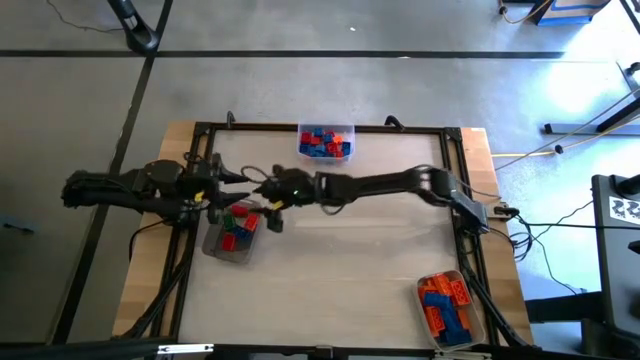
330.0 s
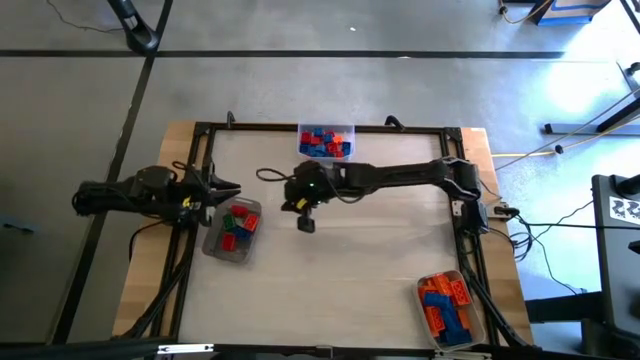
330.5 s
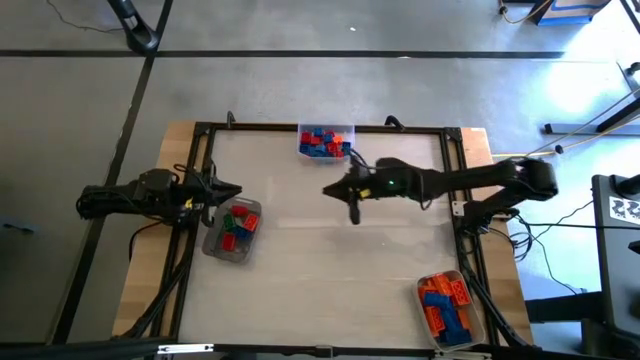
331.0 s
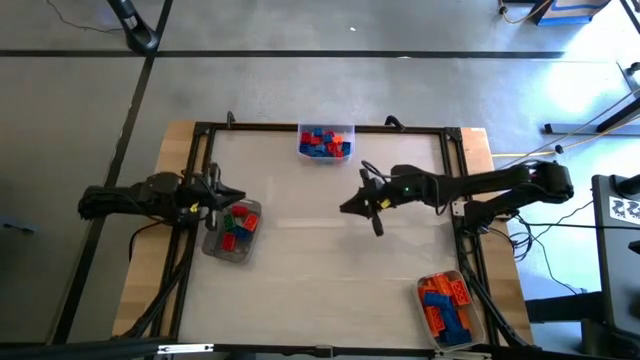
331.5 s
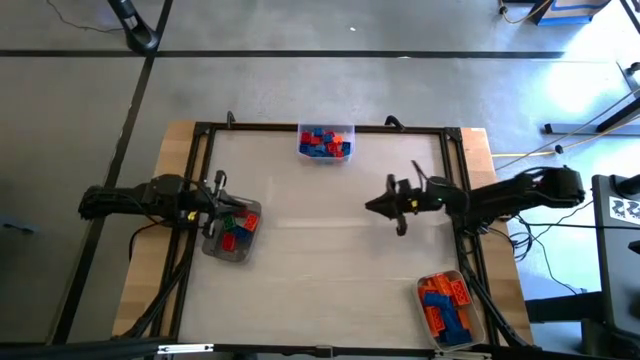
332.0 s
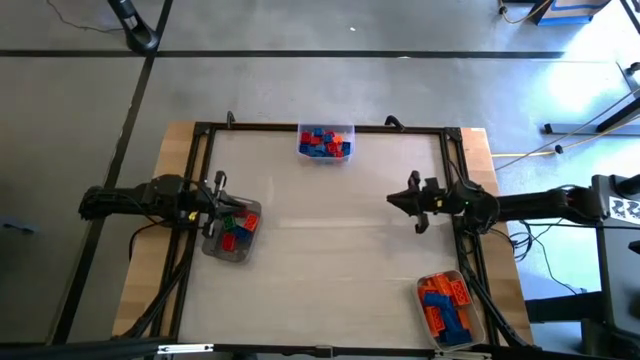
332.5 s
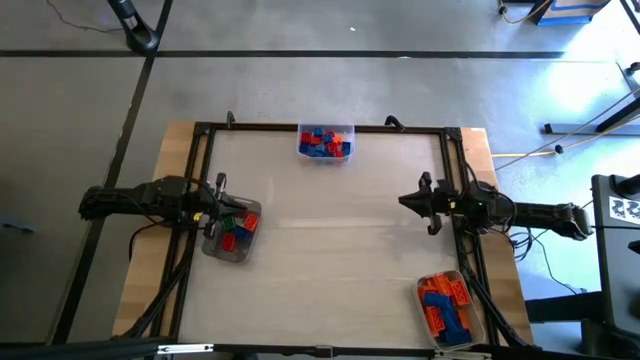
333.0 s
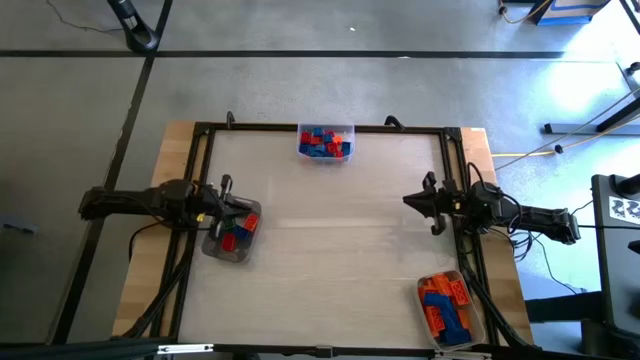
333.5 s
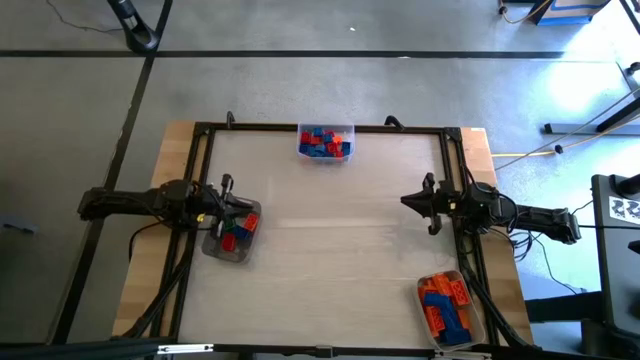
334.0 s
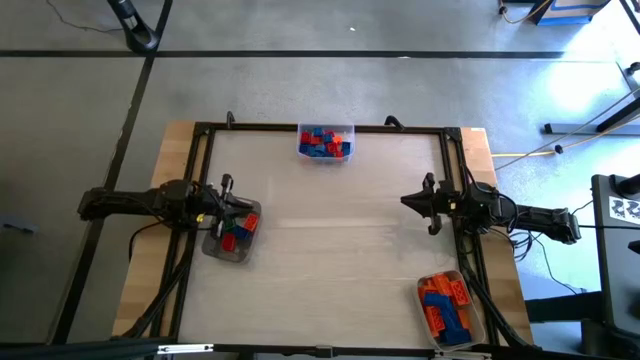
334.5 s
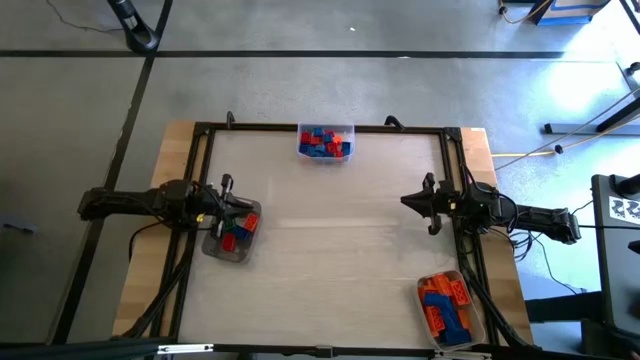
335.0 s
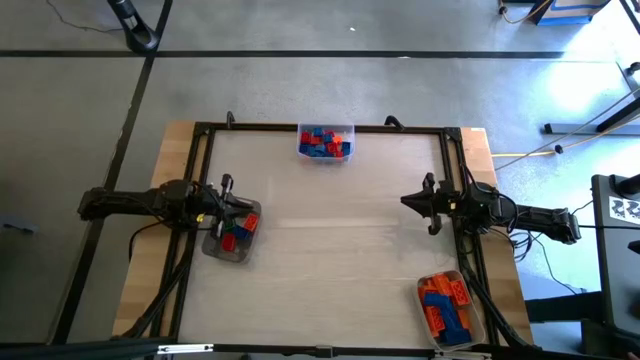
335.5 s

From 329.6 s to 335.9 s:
Task: Sort blocks by size
Return to Home Position

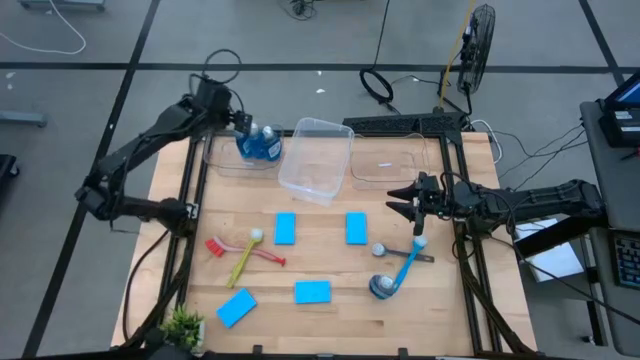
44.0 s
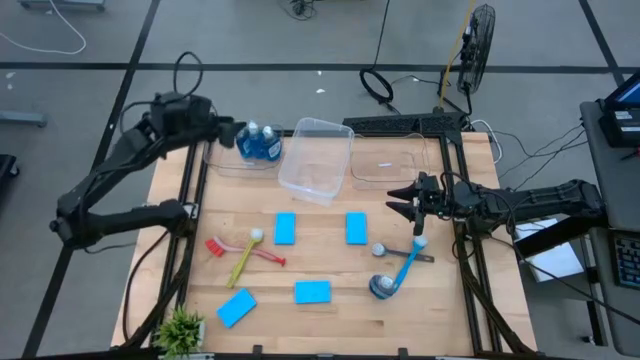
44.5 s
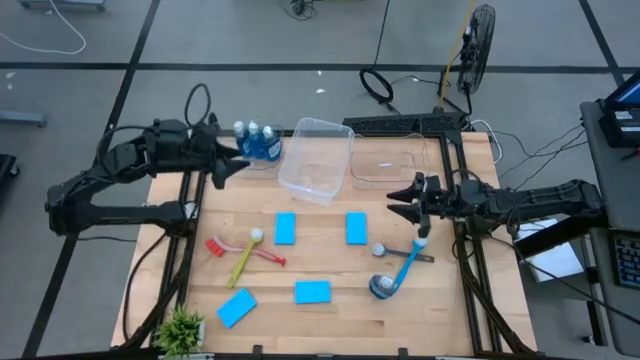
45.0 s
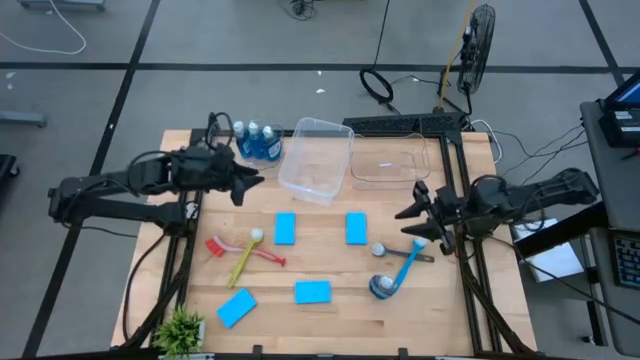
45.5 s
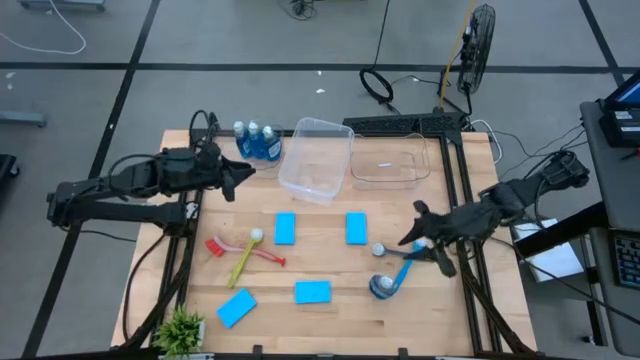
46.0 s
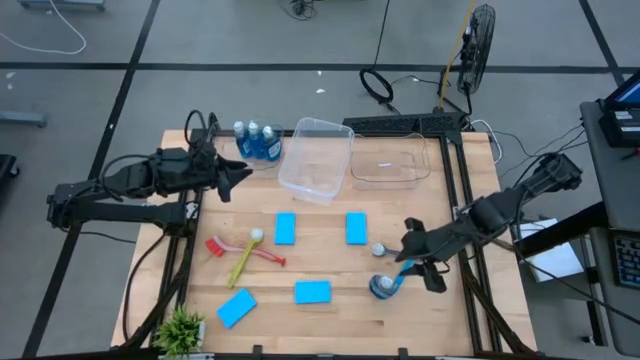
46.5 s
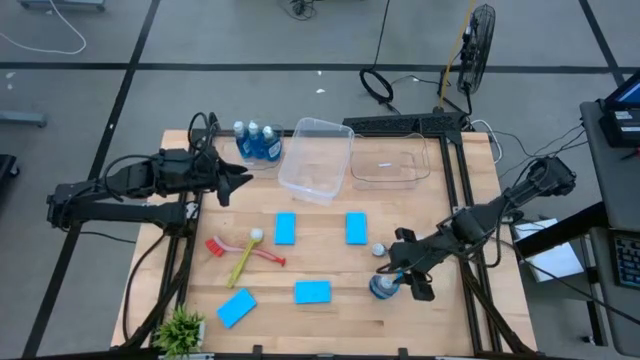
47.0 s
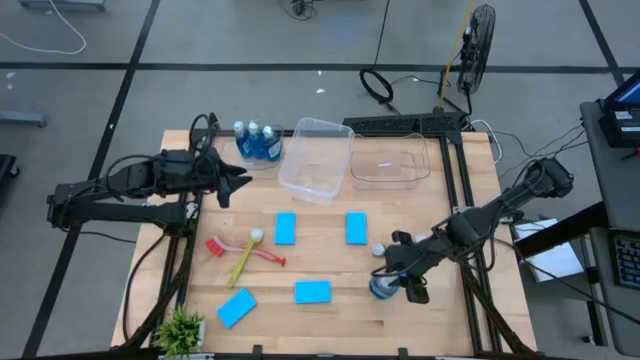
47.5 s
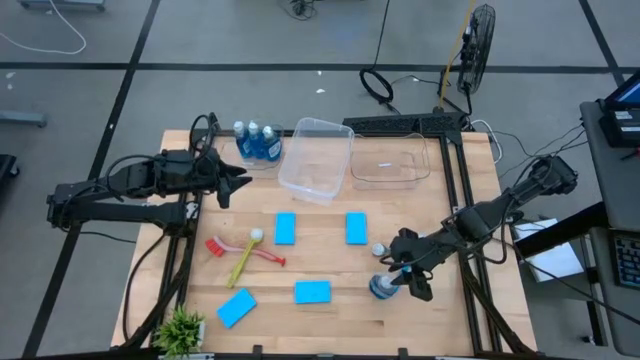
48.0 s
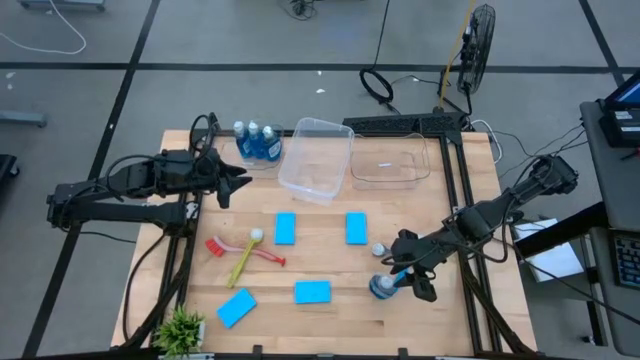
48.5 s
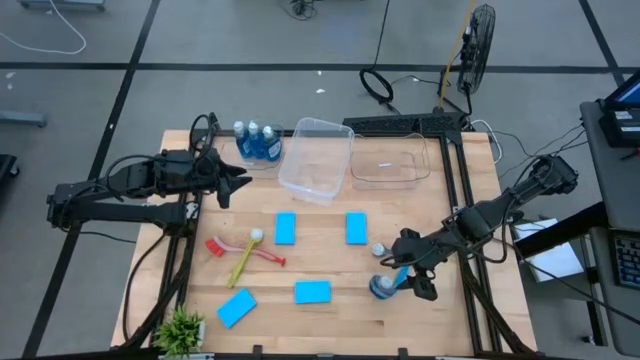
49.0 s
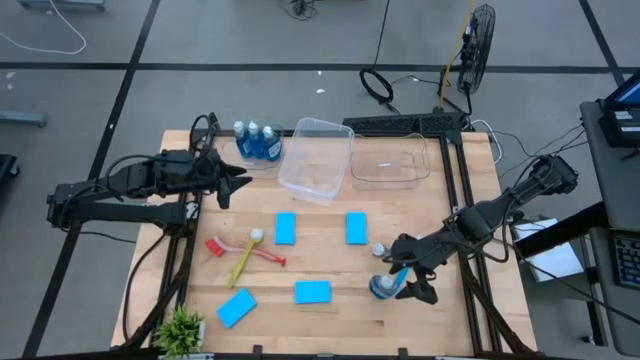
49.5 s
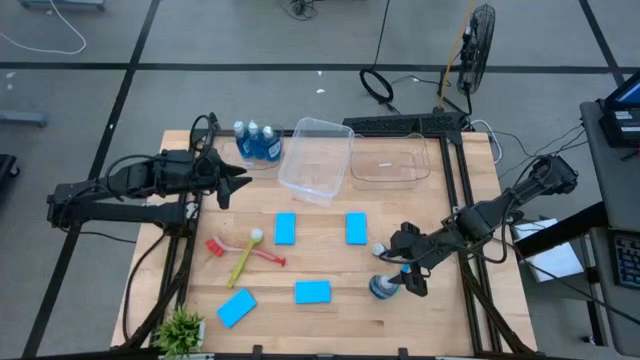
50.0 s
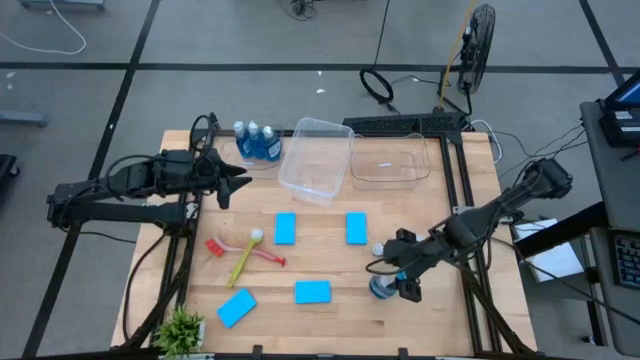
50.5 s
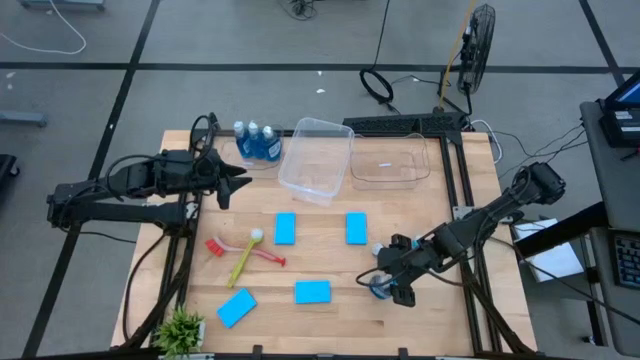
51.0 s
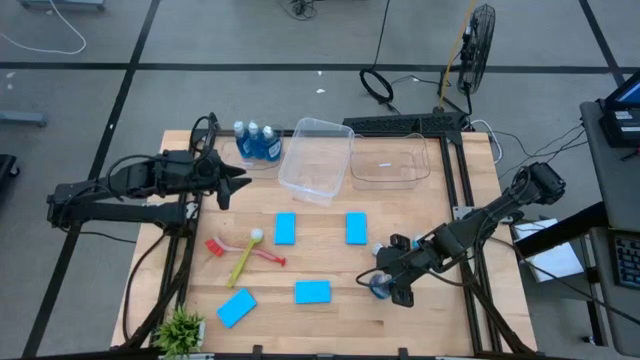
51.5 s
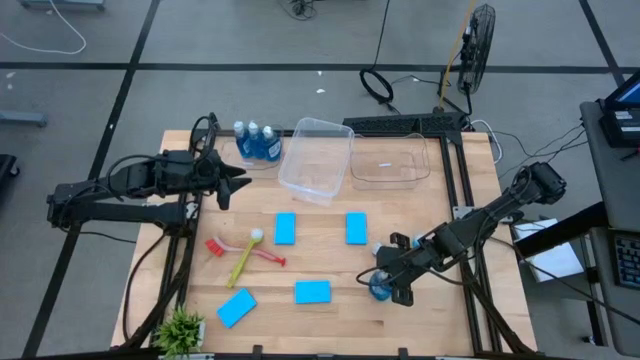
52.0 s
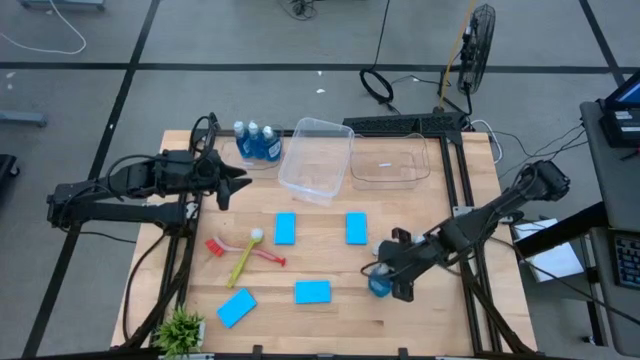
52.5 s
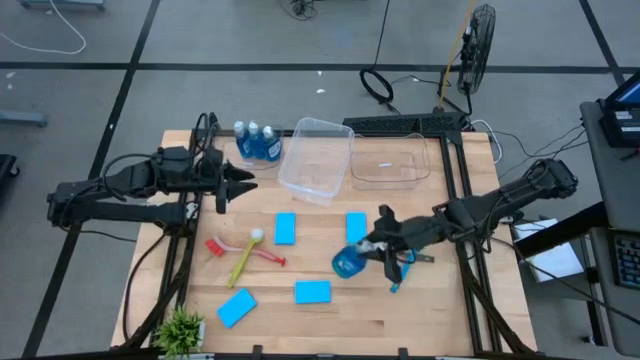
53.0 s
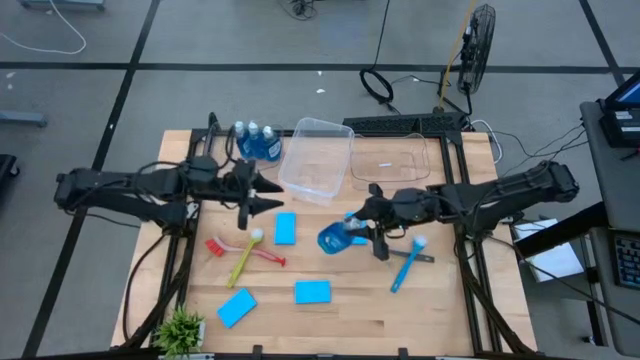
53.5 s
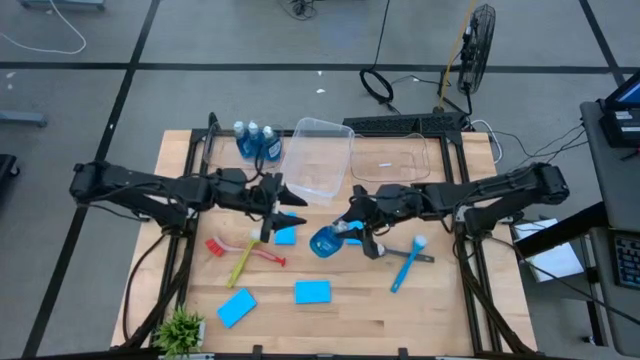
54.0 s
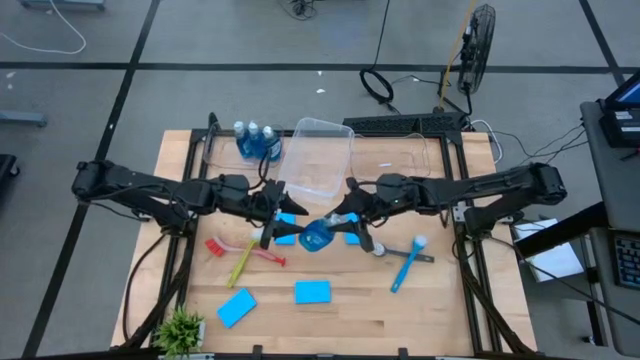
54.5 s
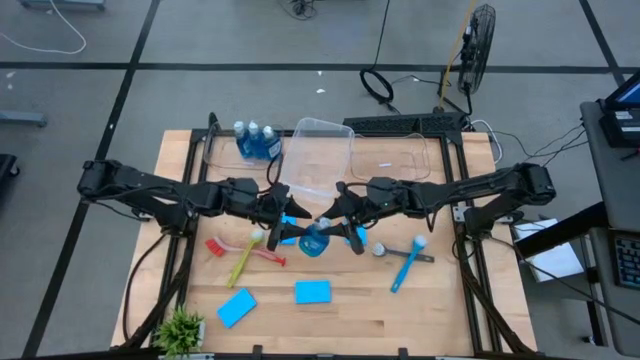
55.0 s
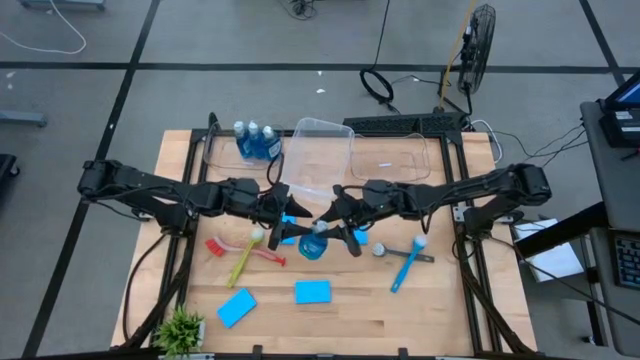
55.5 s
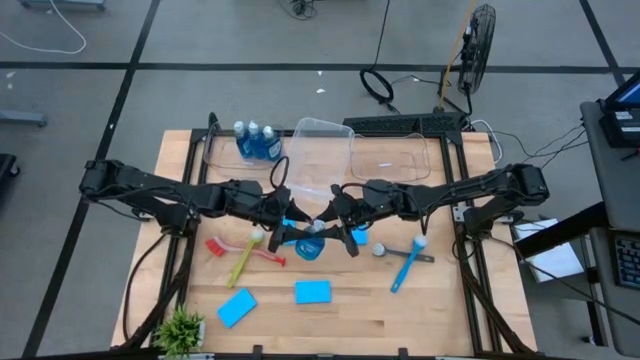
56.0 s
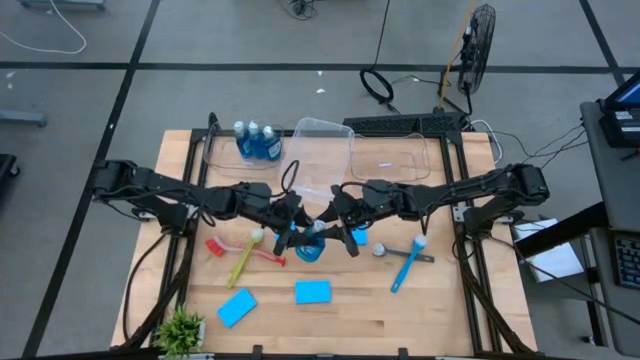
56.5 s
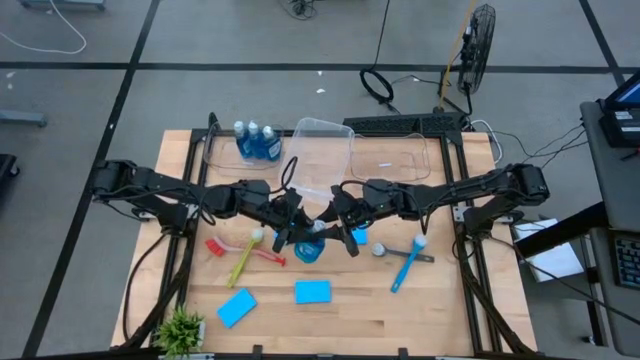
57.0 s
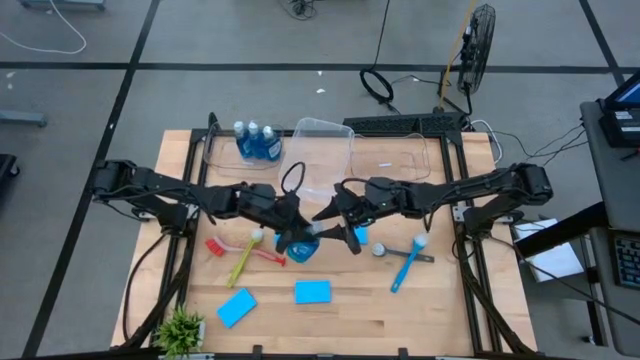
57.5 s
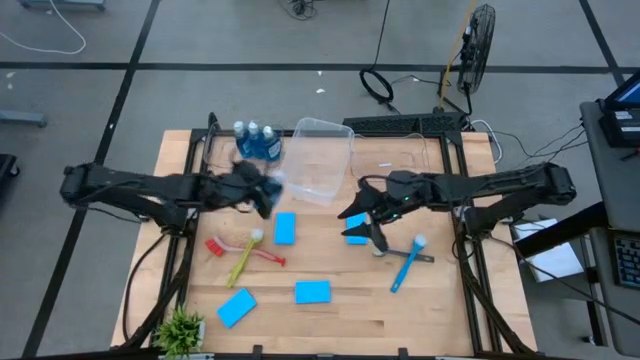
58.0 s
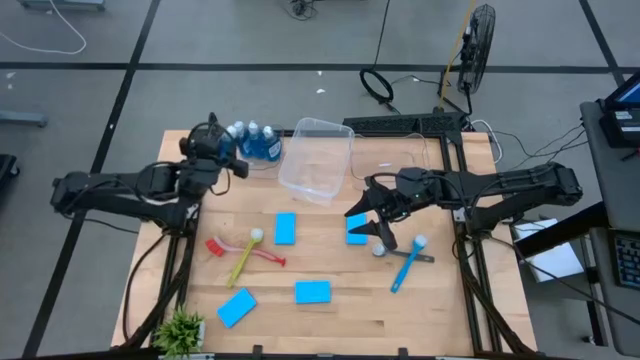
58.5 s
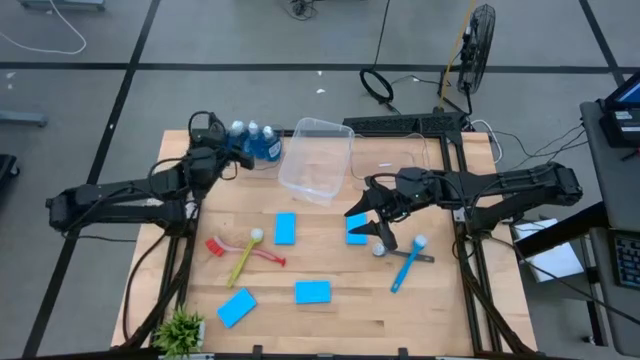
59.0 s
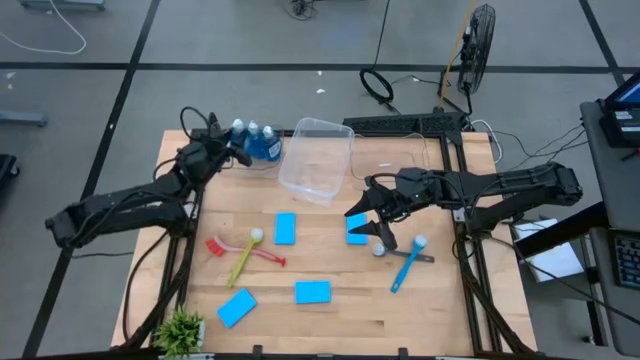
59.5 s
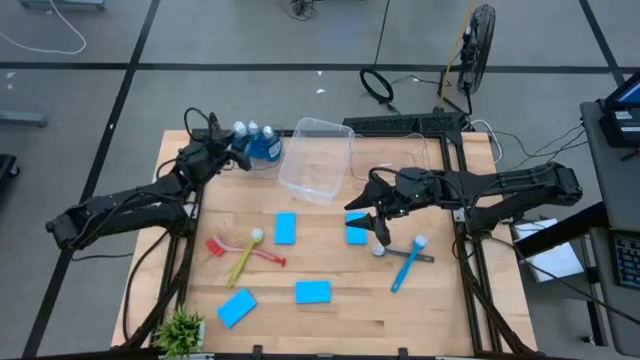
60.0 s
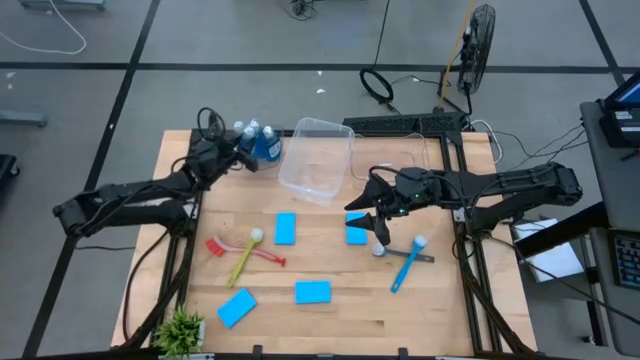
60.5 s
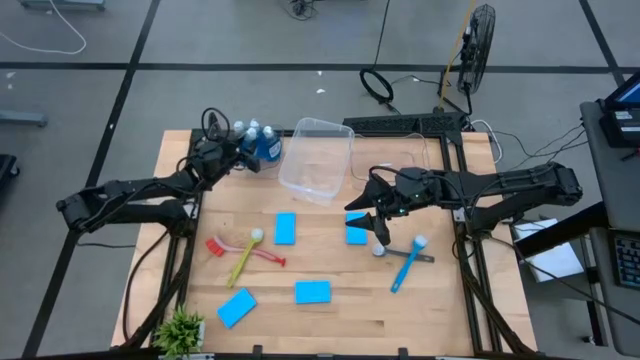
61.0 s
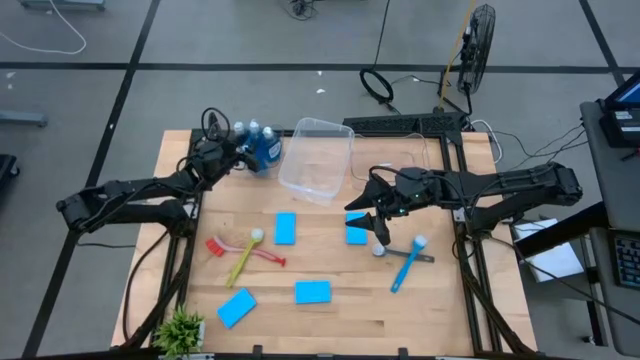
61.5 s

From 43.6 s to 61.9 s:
Task: Pick & Place Kitchen Sink Supplies
Put the blue dishwashing liquid into the left transparent bin
